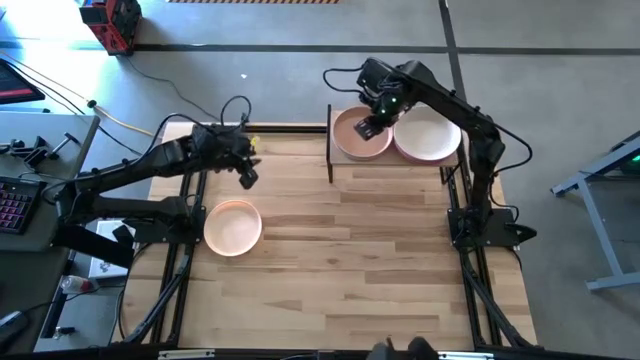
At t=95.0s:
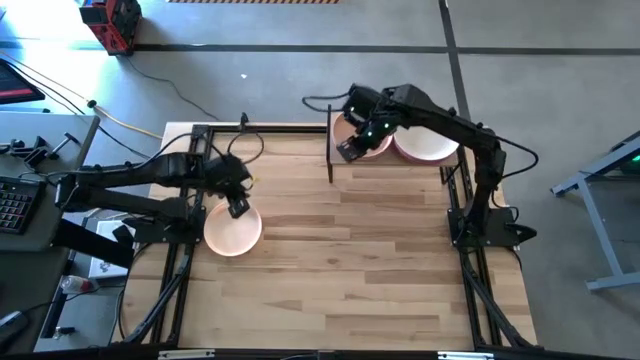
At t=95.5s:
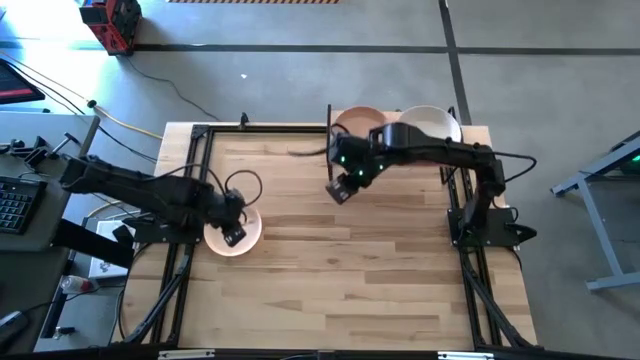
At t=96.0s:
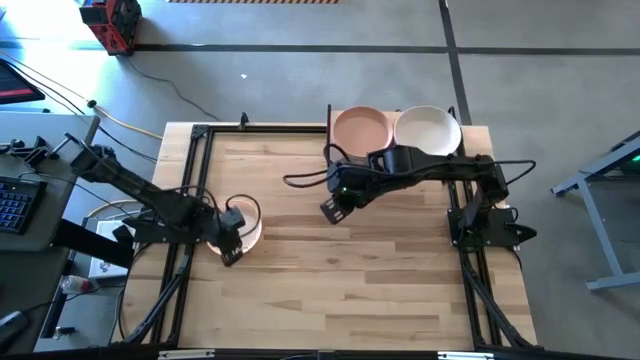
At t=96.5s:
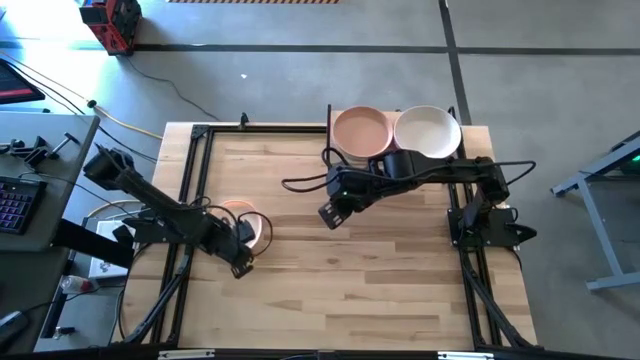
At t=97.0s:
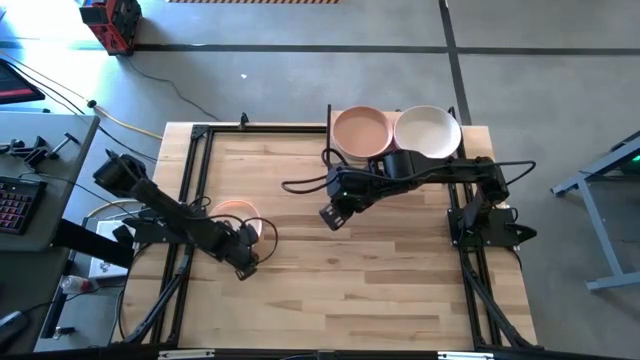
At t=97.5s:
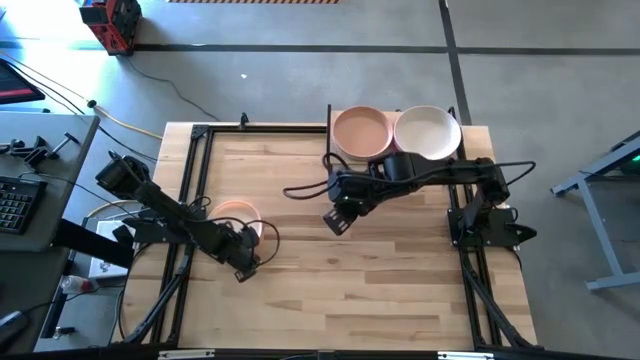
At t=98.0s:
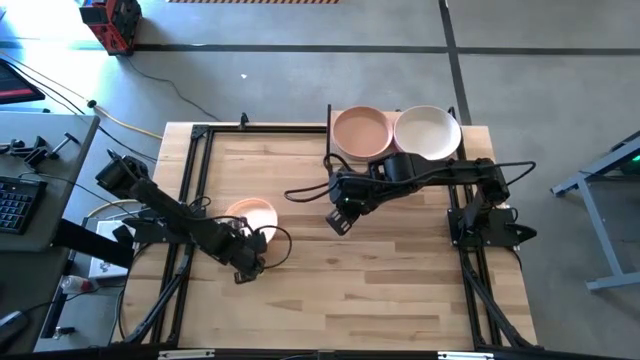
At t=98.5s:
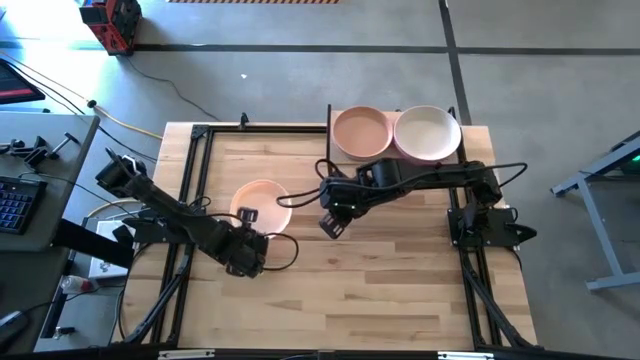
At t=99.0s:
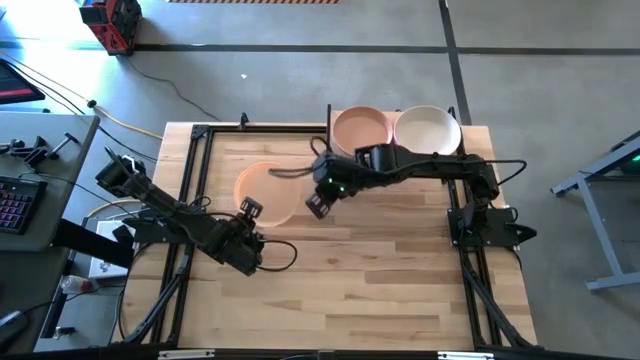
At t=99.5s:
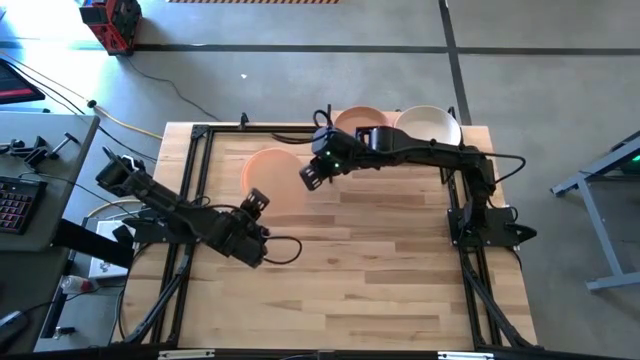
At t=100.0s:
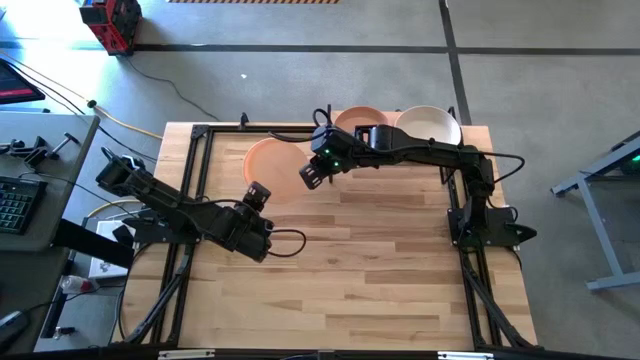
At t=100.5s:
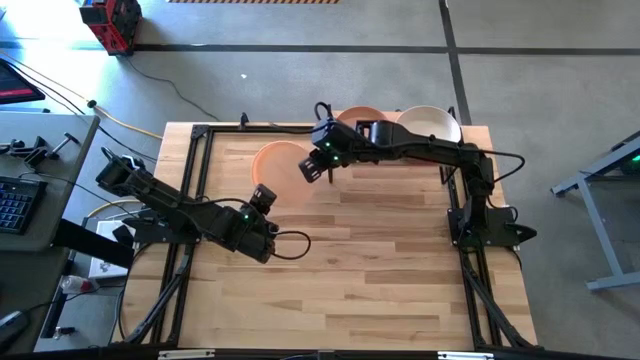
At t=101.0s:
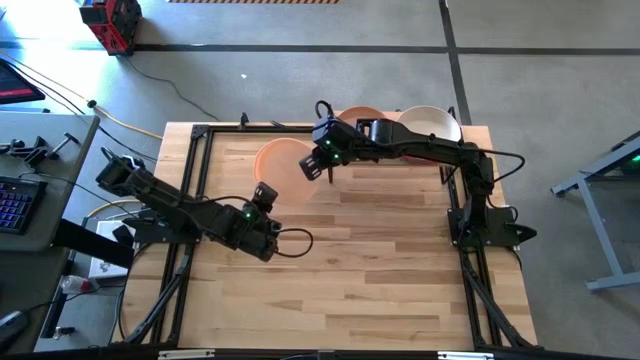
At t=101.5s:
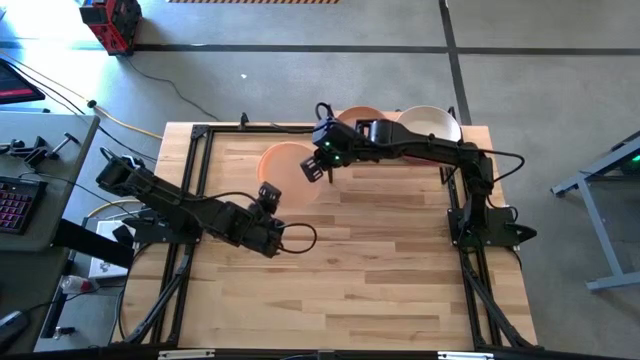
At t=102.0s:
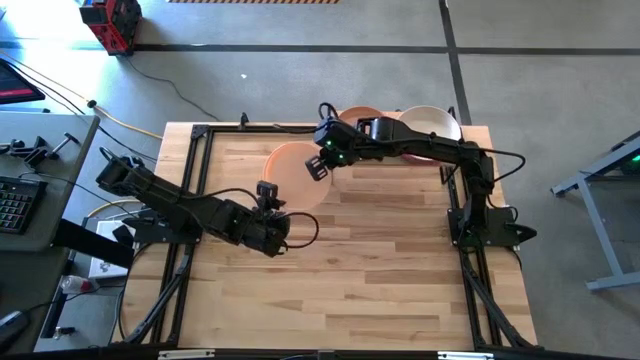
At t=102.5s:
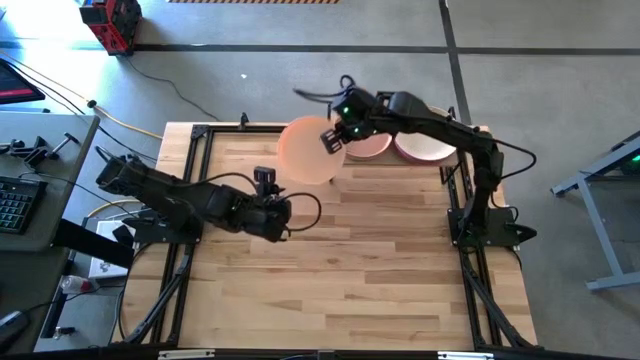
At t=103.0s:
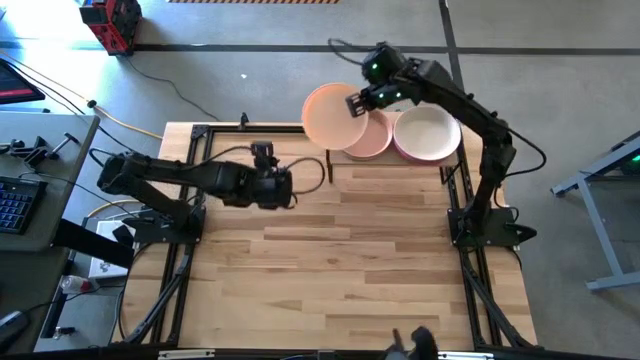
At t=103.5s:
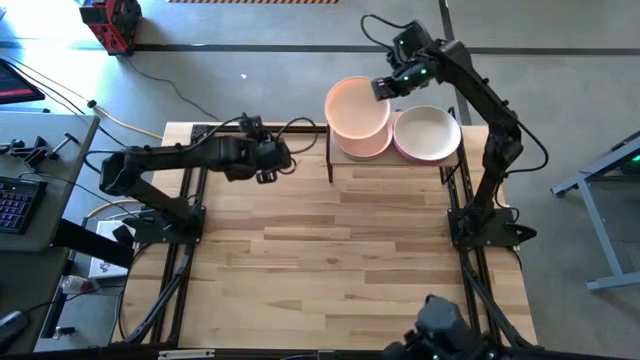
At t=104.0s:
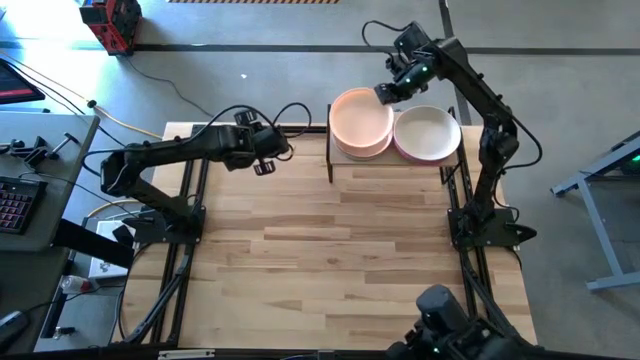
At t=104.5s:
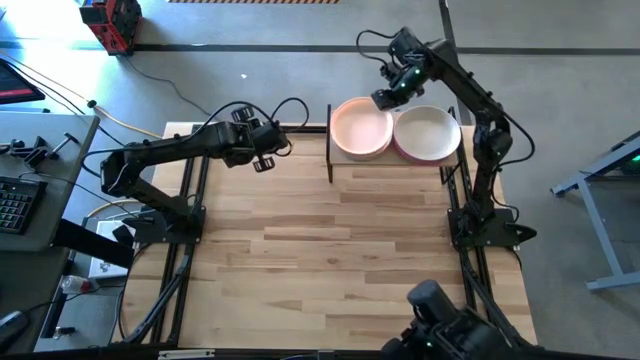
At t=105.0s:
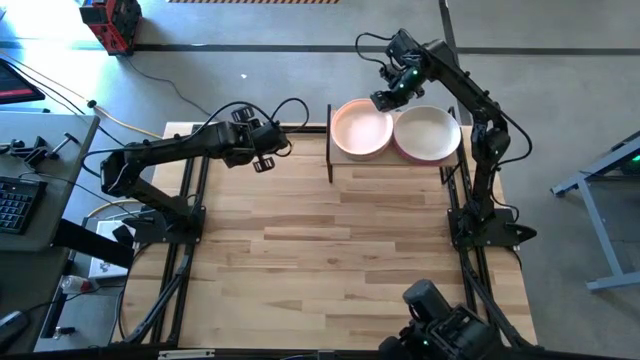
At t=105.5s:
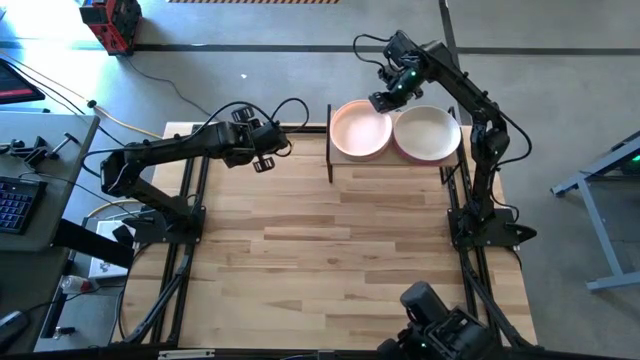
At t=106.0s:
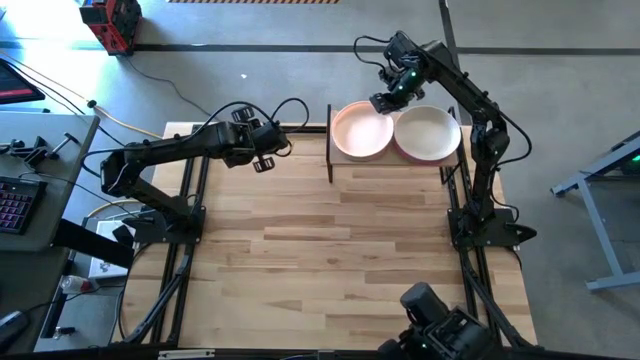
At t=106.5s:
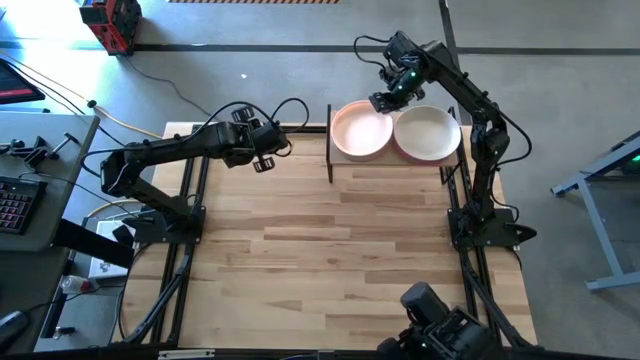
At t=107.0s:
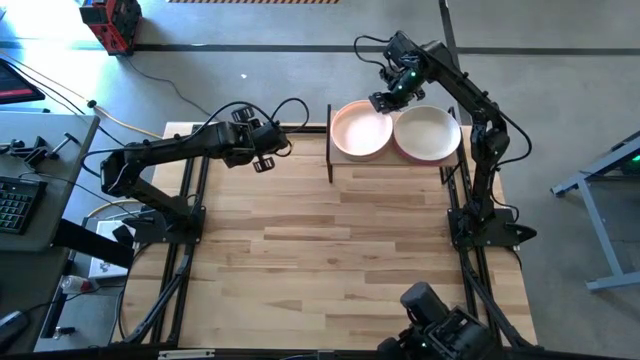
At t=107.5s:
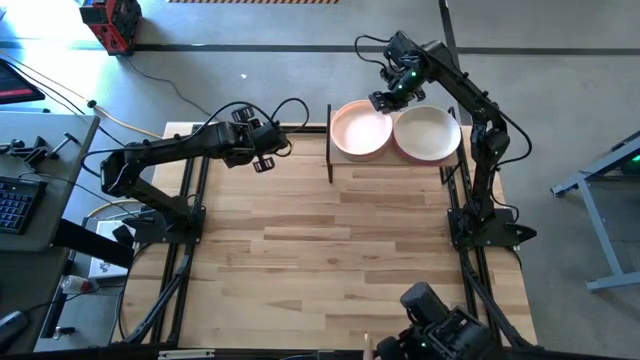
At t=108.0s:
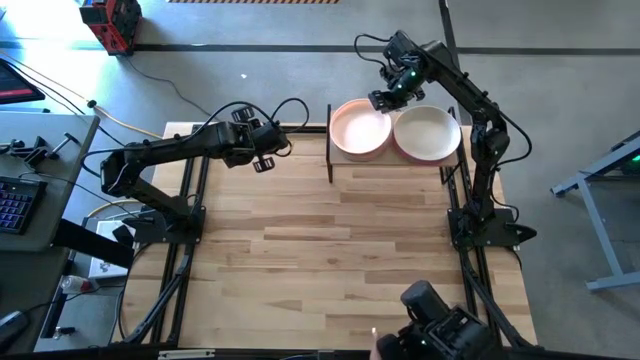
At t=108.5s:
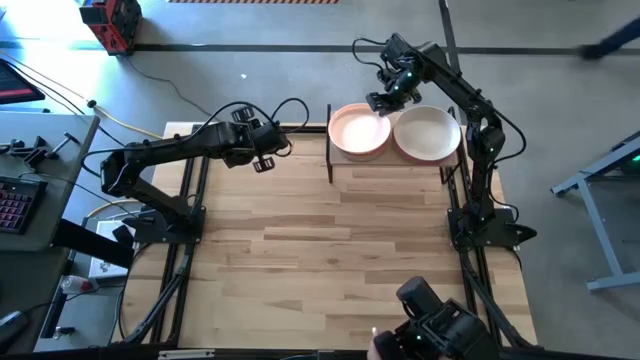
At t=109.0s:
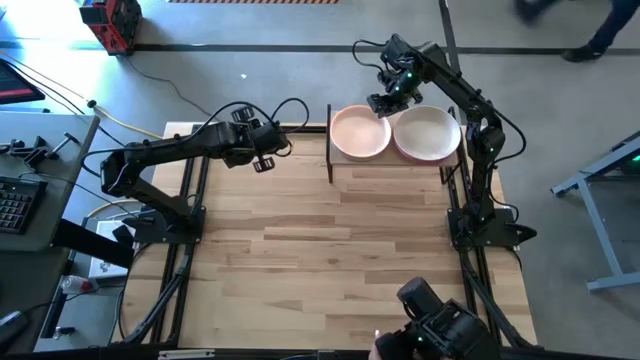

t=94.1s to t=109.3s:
Task: Place and stack plates onto a shelf
Stack the light brown plate on top of the other brown plate on the shelf

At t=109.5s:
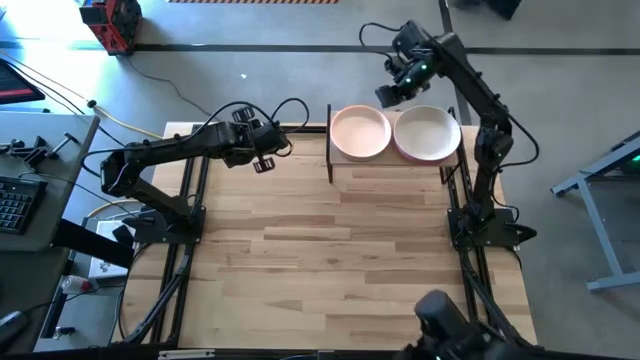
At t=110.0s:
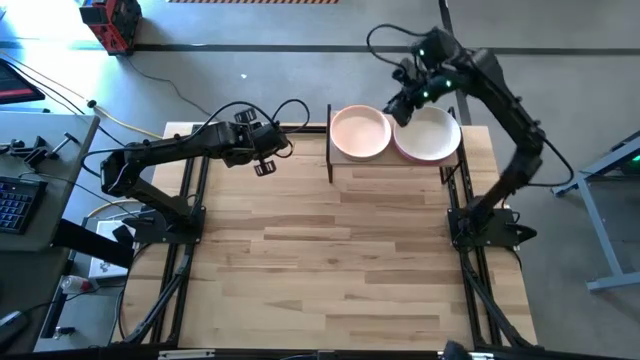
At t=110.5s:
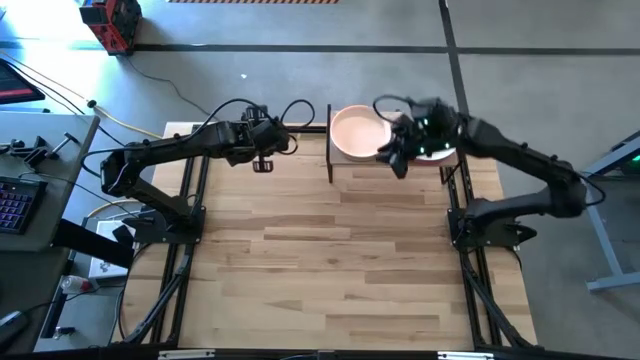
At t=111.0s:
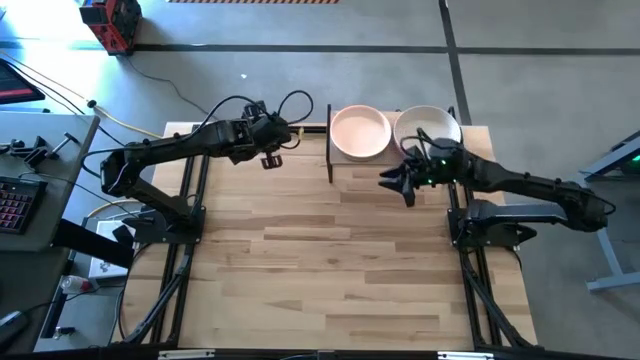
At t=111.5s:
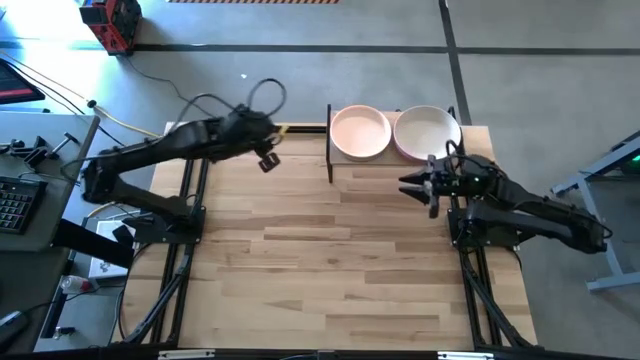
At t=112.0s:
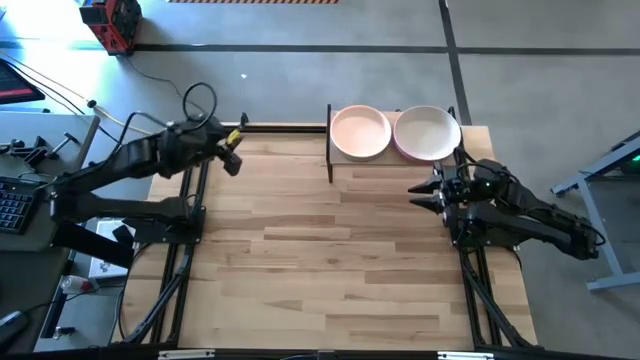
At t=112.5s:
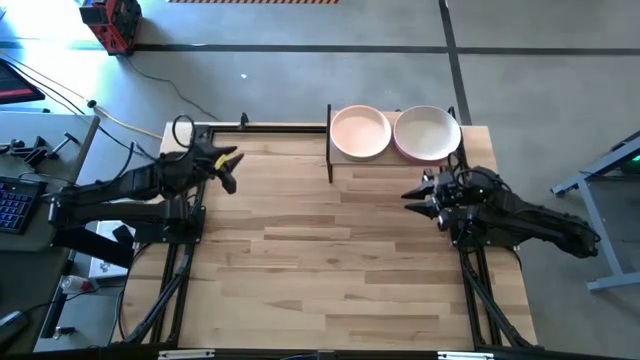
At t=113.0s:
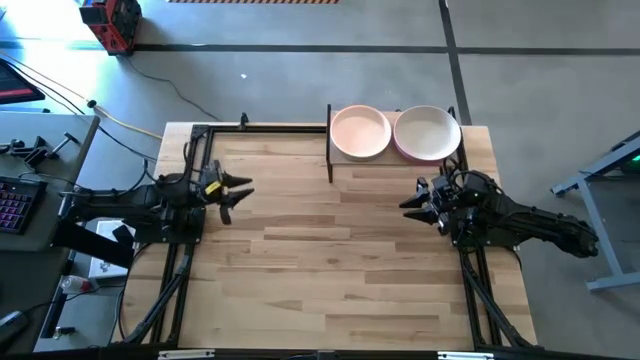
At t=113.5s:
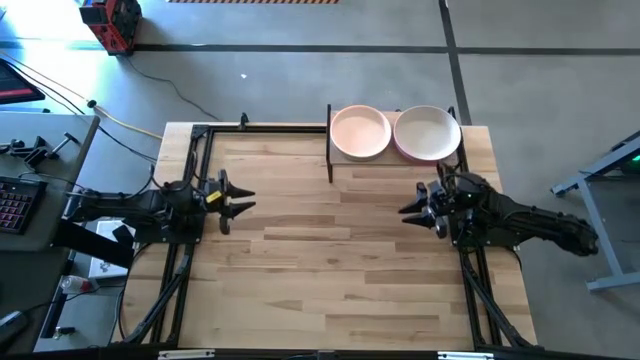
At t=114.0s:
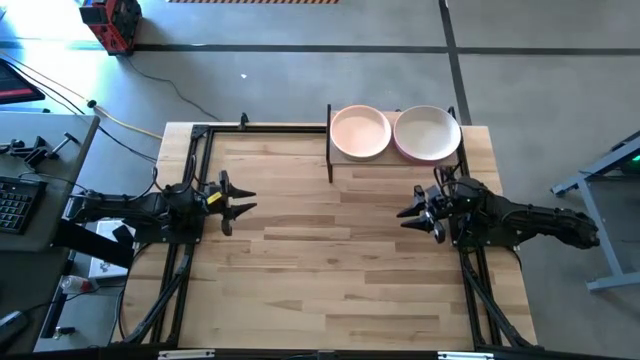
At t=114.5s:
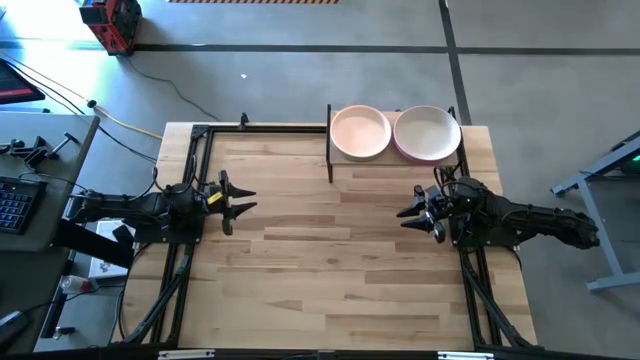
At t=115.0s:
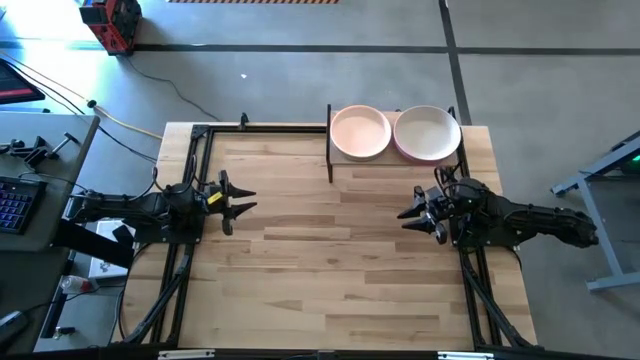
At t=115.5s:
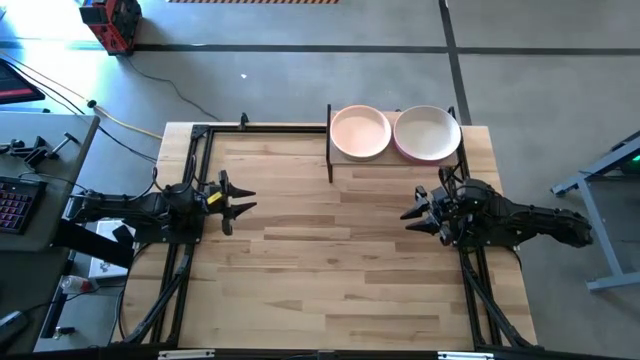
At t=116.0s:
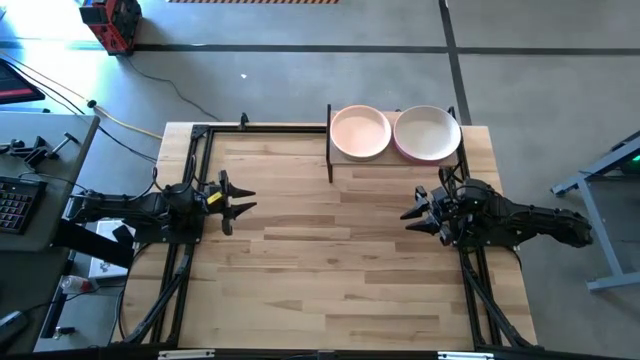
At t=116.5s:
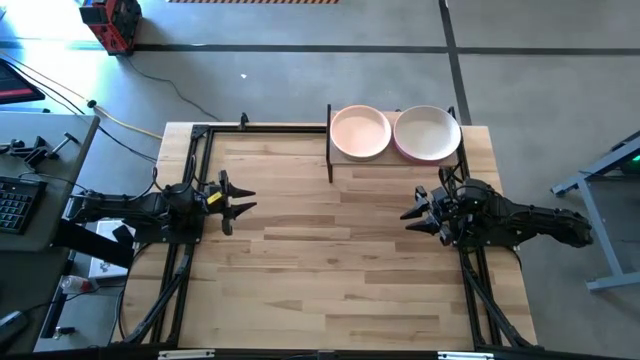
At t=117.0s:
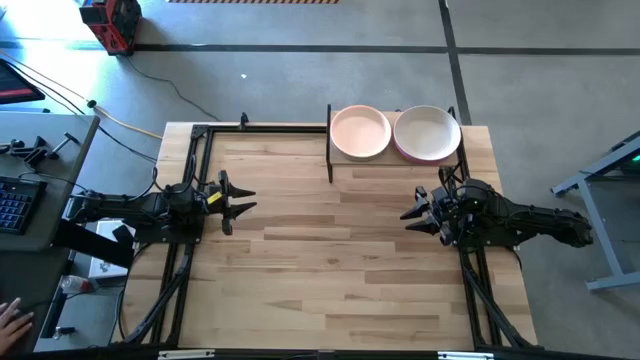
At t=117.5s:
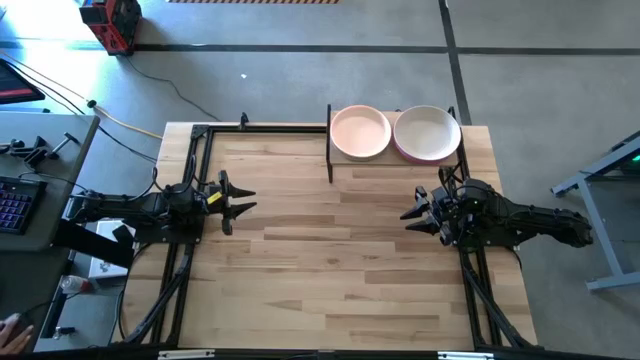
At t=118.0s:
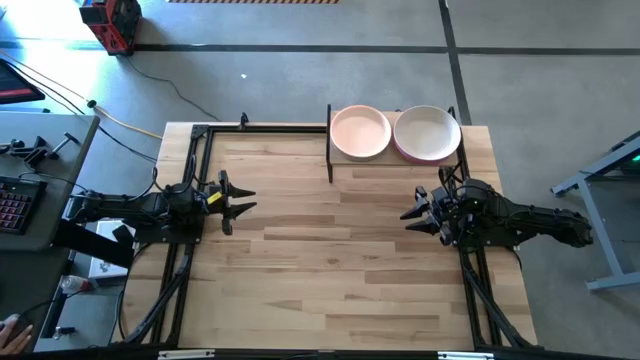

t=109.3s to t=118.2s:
Return to Home Position
